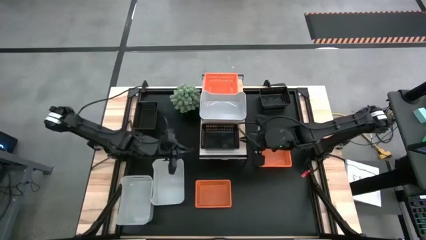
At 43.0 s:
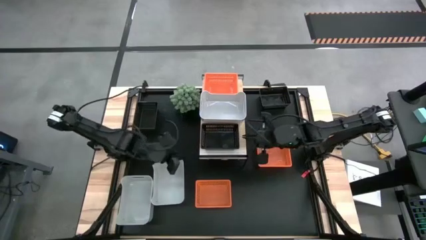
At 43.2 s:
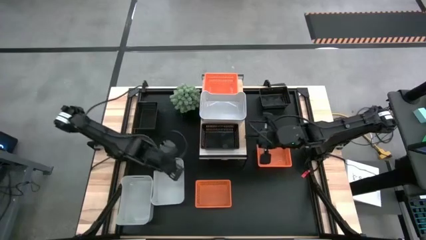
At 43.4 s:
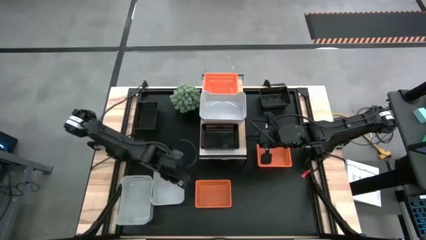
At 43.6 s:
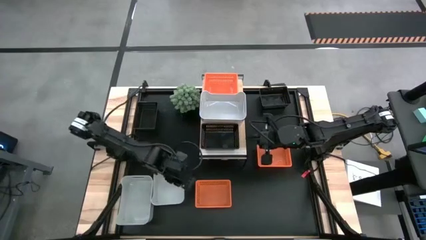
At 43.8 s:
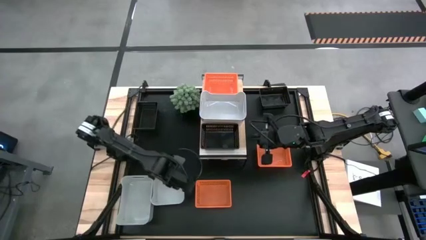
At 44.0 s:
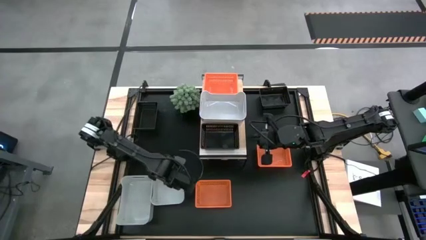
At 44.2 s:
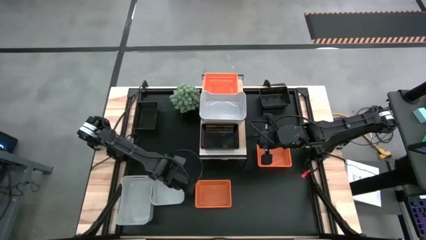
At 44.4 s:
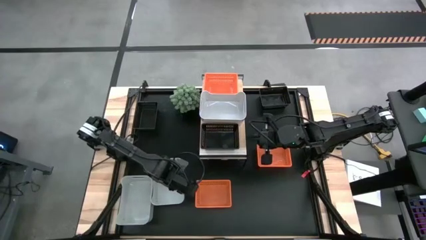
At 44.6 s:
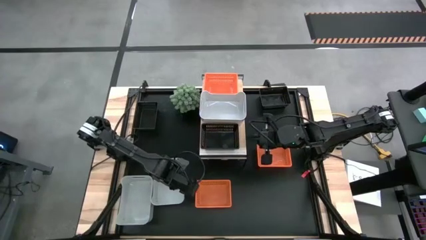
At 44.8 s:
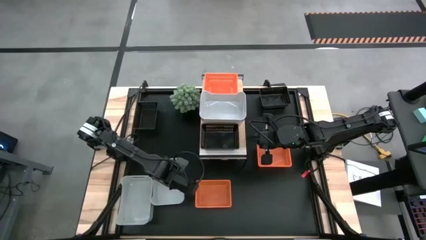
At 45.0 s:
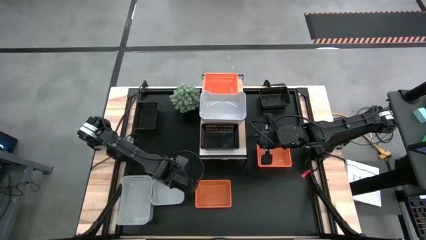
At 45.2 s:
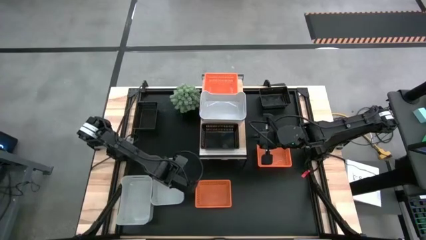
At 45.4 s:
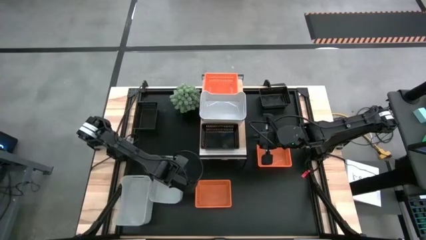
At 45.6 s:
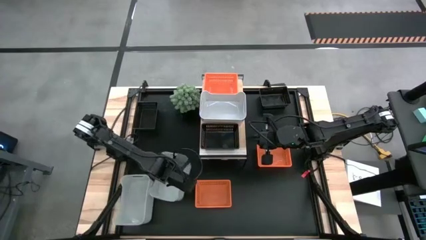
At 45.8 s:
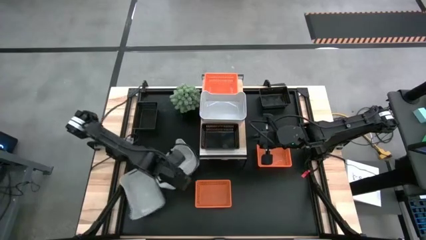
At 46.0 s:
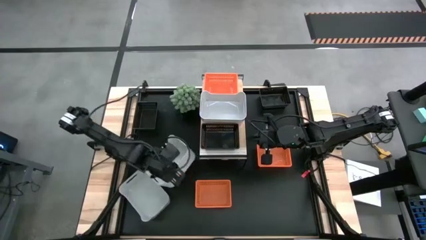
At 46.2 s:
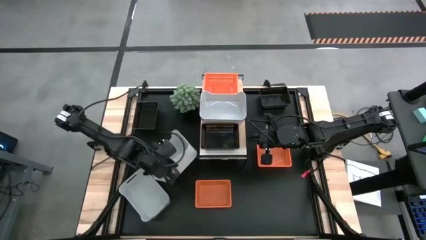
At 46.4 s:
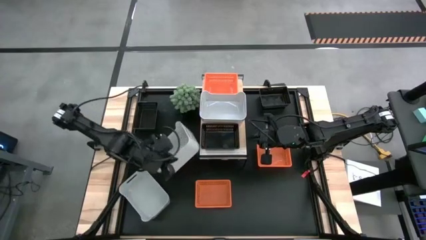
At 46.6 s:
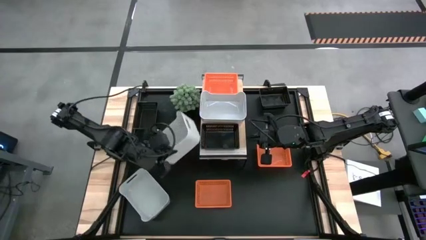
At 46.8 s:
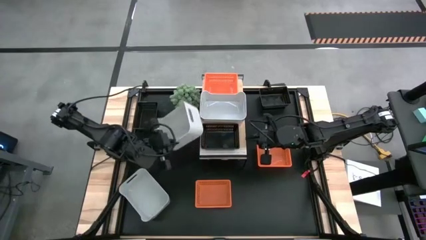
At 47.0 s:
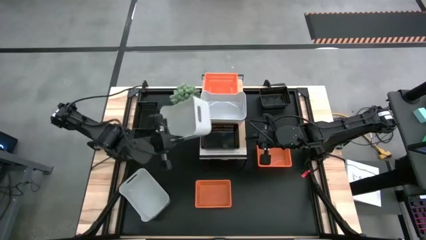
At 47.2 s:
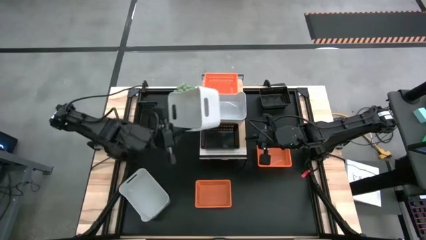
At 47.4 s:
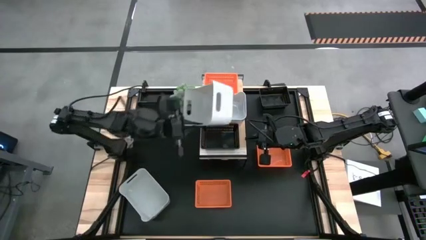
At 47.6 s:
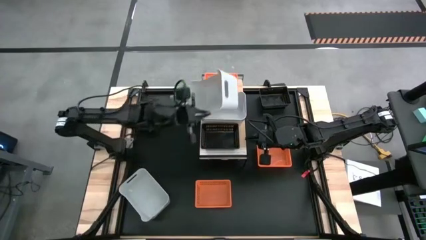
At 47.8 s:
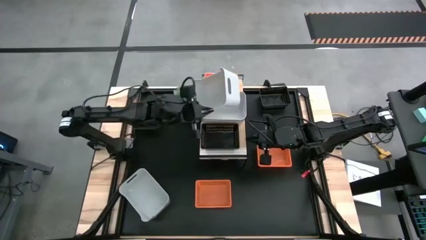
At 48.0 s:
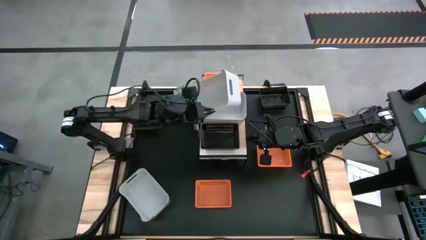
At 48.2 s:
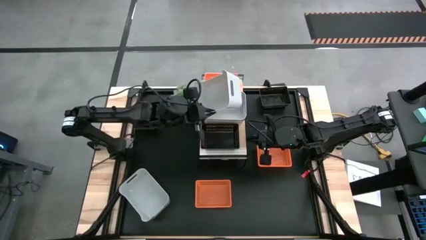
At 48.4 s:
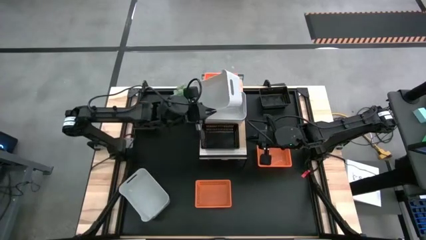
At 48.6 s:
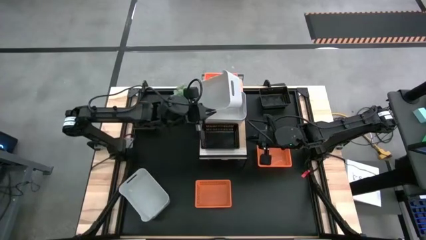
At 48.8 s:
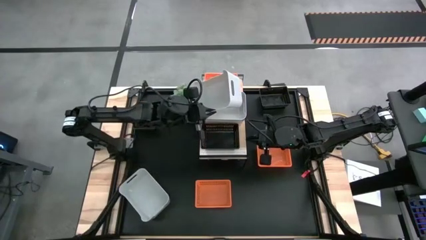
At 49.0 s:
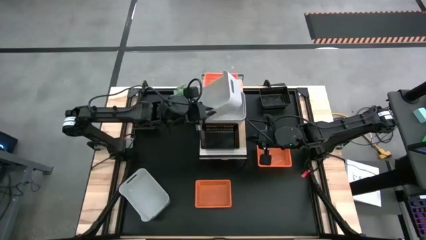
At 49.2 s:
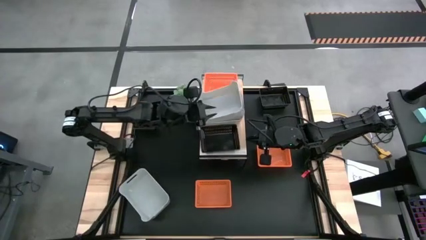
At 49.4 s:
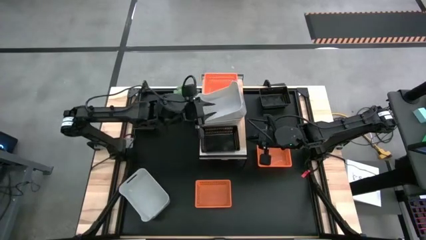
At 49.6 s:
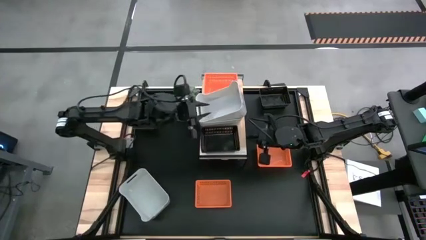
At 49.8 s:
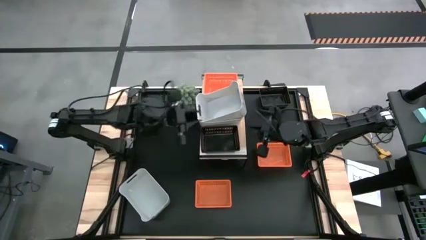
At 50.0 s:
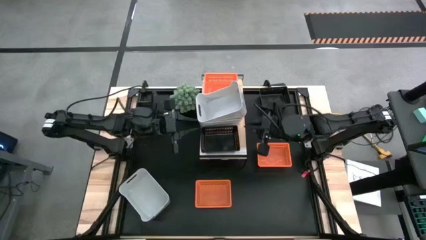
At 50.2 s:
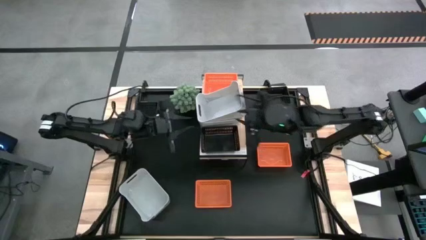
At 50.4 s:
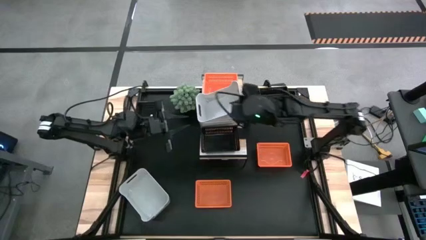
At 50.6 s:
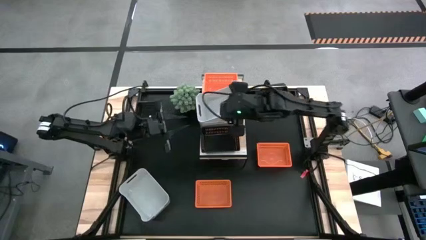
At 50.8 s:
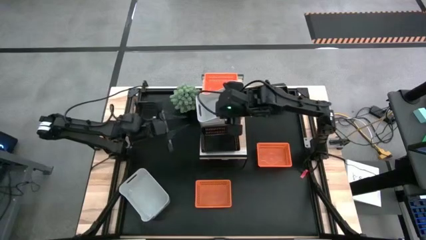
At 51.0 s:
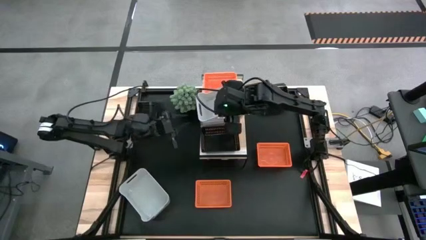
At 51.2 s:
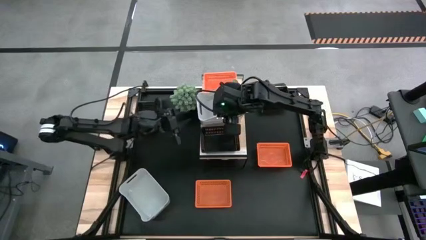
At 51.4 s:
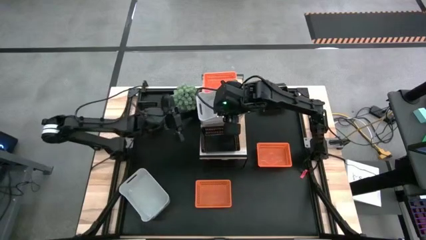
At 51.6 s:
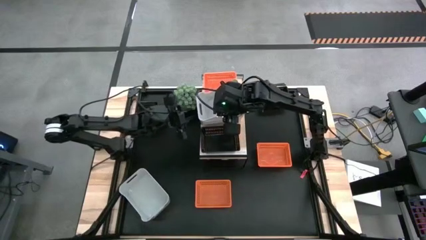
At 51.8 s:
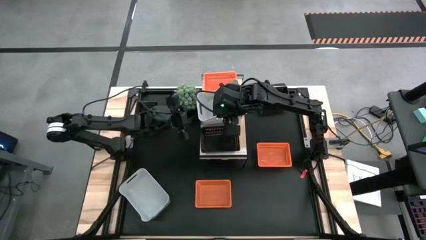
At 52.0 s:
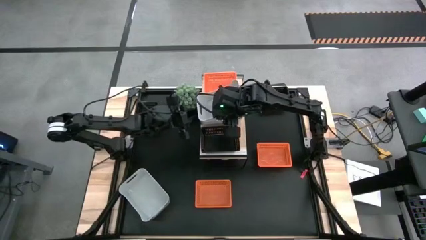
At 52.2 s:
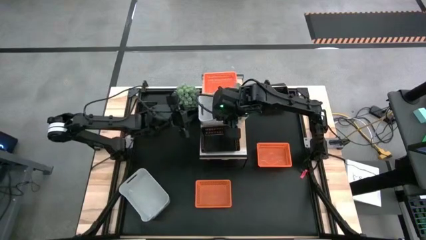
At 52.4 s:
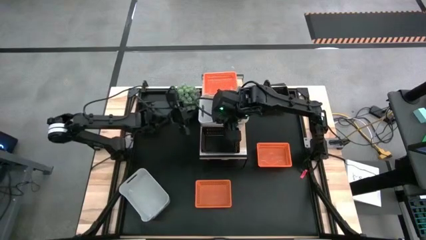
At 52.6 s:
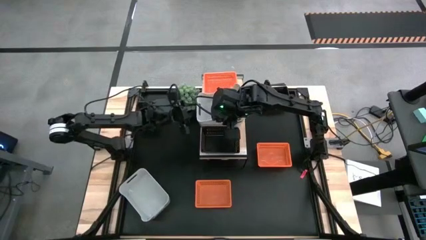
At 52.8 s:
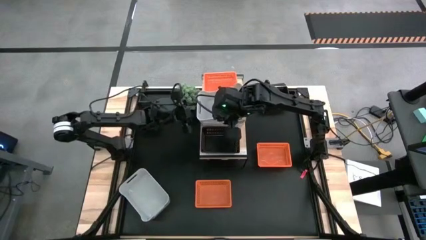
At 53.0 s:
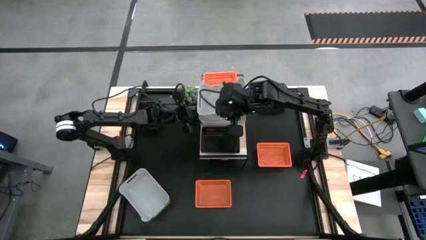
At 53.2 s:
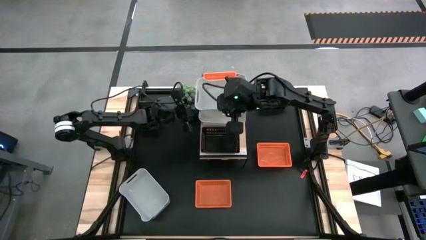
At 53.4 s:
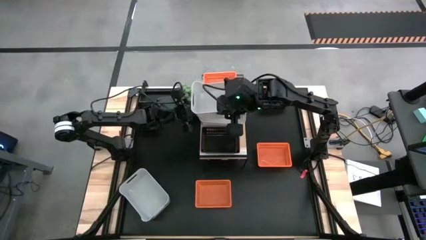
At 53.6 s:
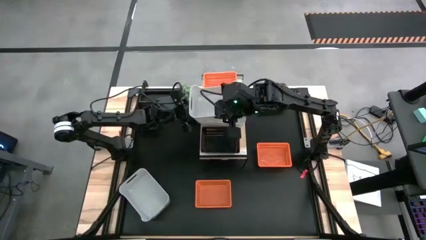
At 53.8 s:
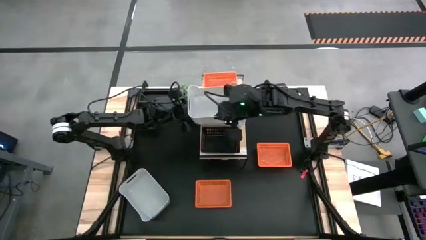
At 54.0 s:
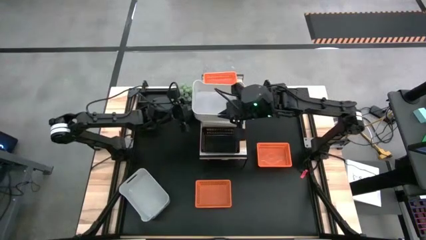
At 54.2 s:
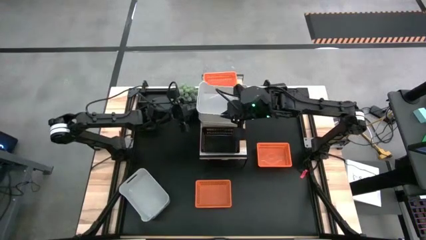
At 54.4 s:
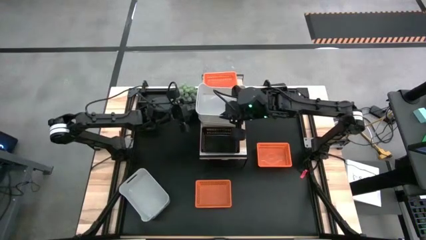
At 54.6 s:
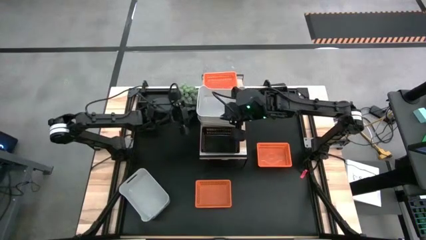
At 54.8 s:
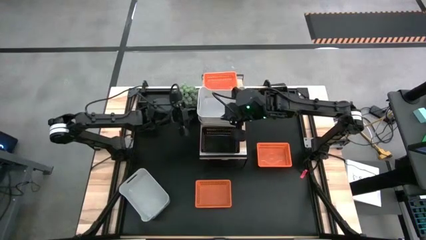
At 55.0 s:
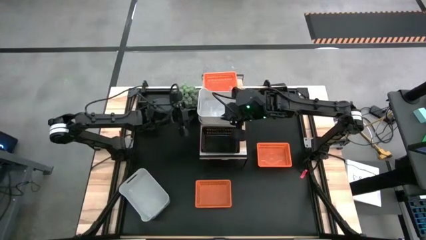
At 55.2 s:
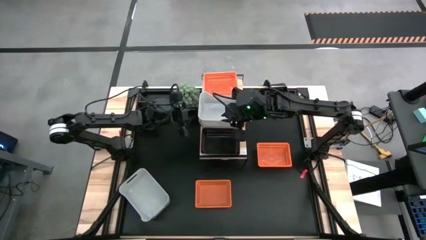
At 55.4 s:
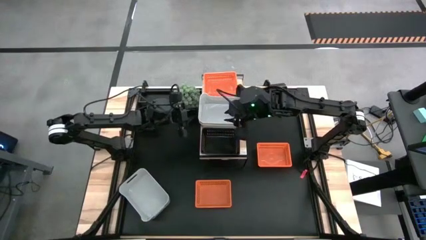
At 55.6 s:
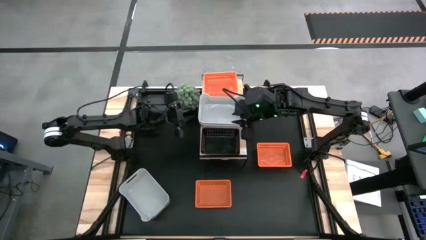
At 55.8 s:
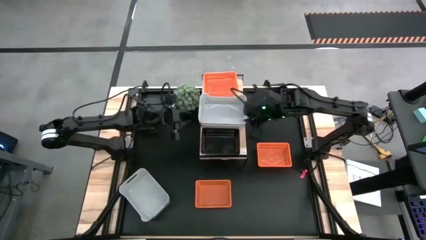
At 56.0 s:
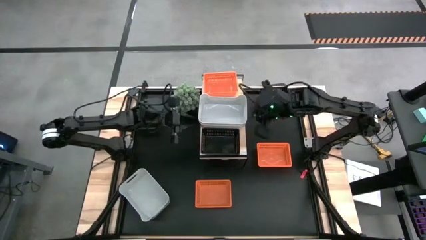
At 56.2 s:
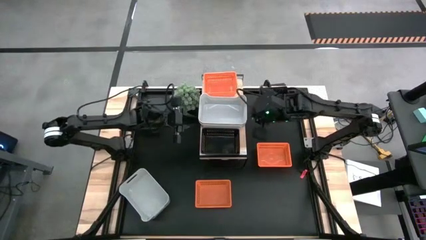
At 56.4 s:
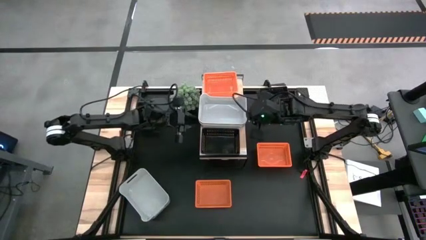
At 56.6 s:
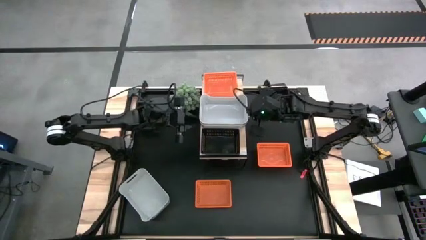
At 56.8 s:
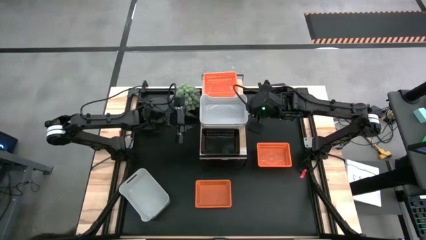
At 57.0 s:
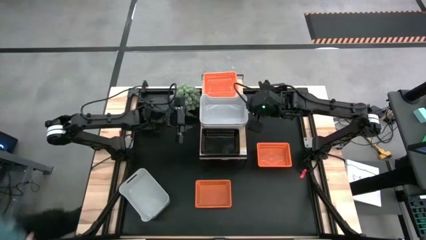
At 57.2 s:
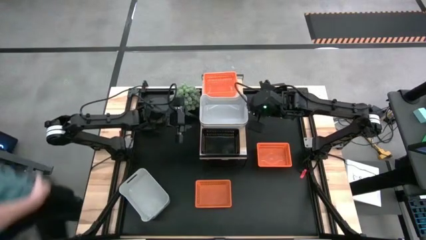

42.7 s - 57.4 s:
Task: Stack baskets on shelf by color
Stack the right gray bin into the gray bin on the shelf

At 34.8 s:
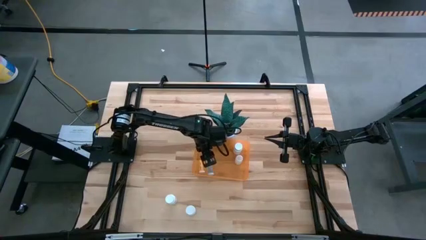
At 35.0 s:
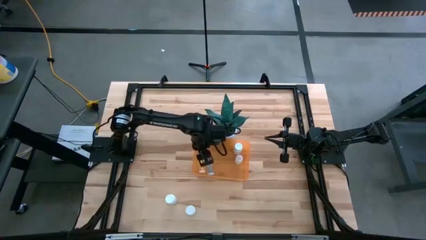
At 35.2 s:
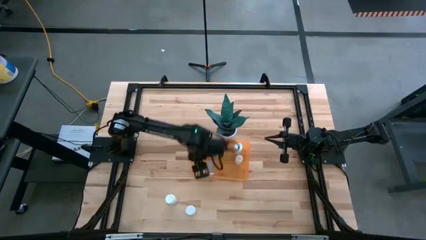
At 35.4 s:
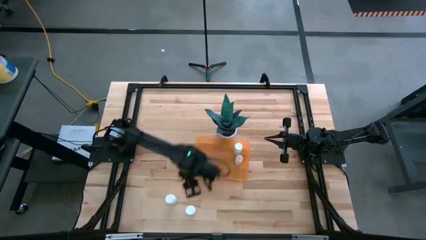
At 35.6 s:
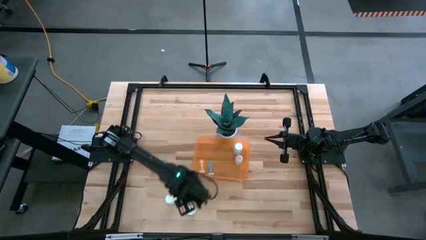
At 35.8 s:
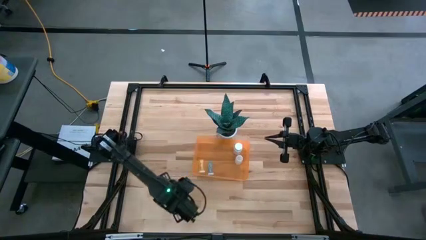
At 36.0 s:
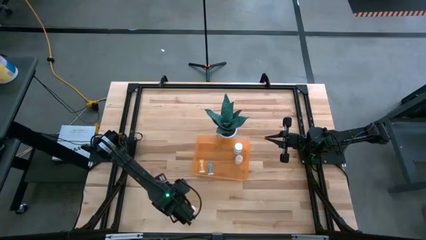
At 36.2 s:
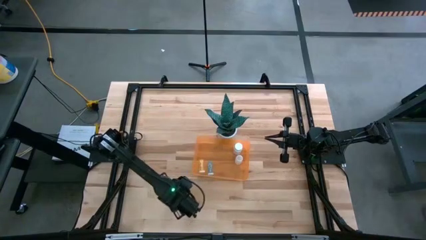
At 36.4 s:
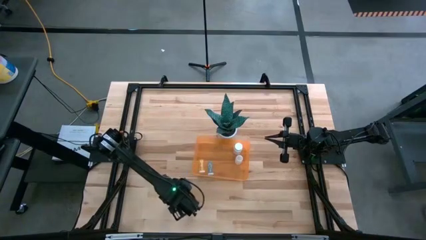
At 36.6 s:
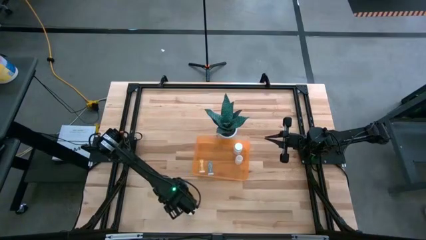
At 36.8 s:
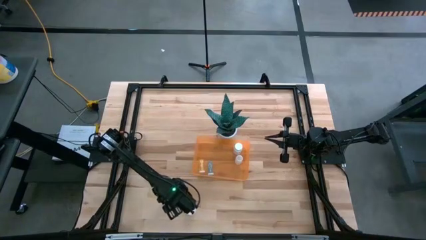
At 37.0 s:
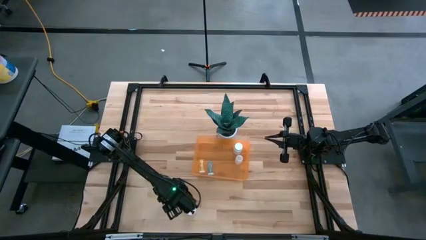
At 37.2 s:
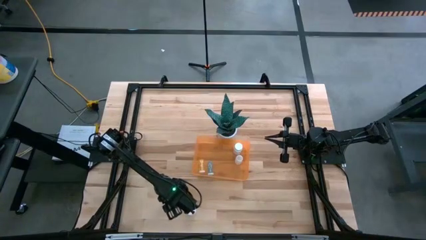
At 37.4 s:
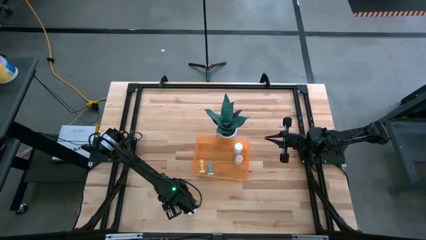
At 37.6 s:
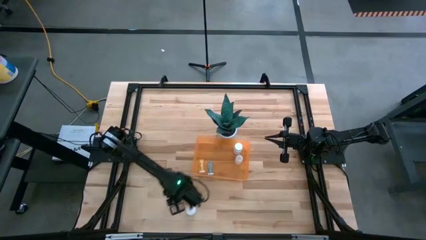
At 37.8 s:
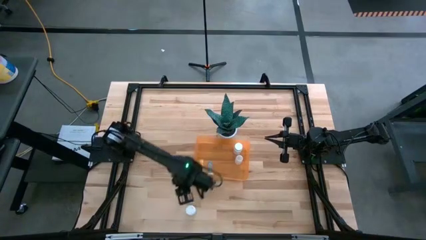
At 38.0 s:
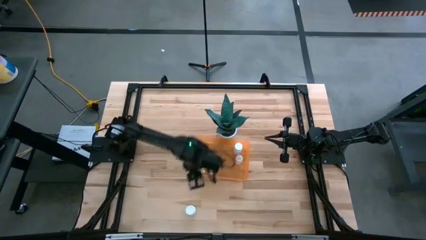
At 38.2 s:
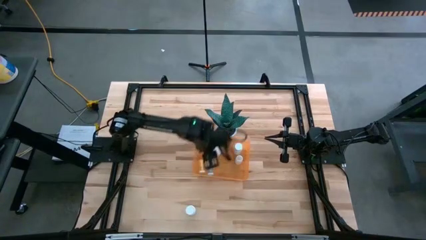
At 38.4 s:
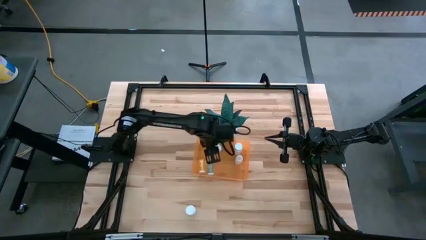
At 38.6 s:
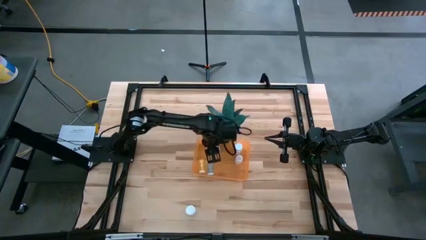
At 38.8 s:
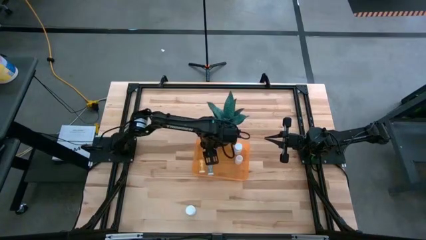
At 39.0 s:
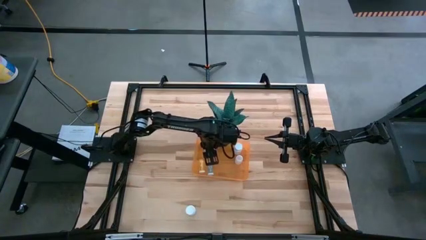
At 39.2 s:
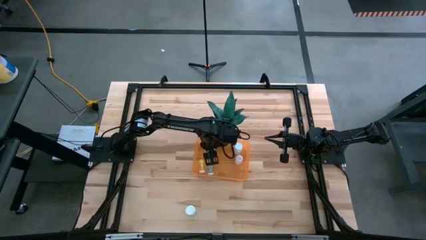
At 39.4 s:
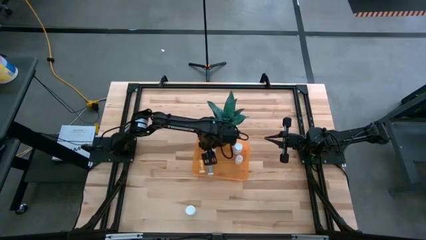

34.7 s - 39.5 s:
Task: Pick and place pill bottles into a basket
Put the left white pill bottle into the orange bin
